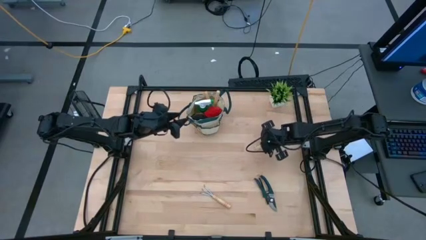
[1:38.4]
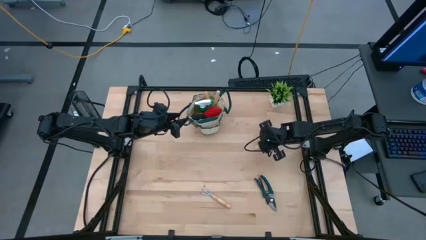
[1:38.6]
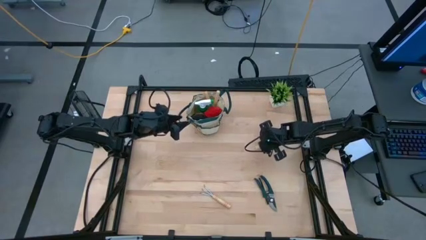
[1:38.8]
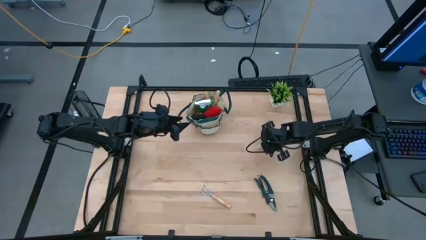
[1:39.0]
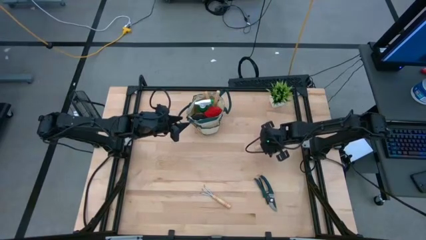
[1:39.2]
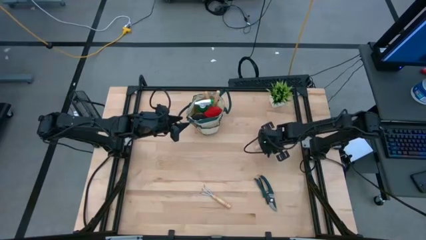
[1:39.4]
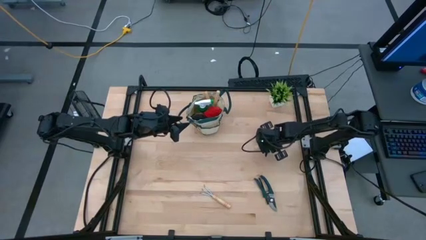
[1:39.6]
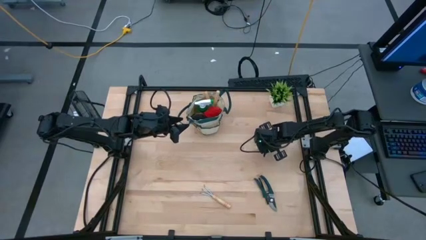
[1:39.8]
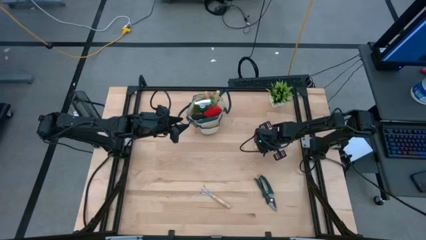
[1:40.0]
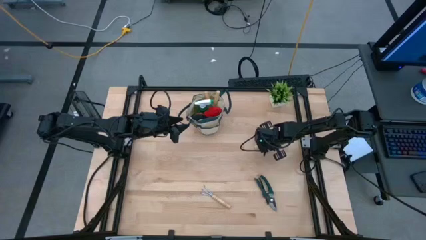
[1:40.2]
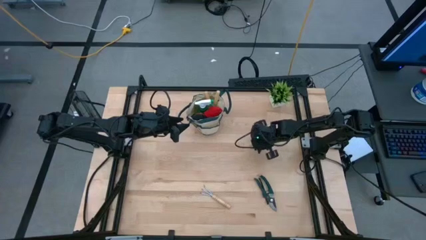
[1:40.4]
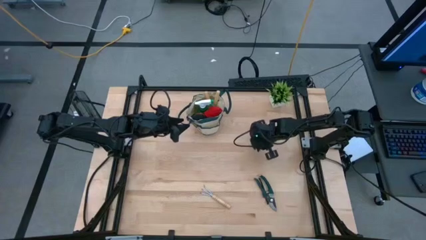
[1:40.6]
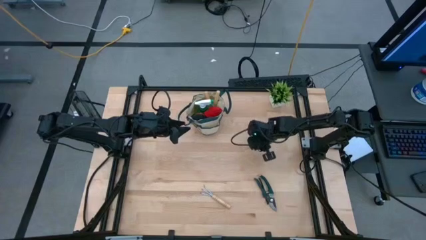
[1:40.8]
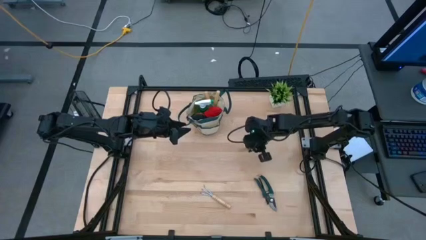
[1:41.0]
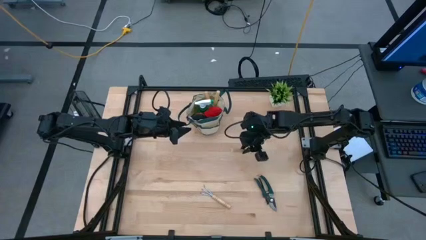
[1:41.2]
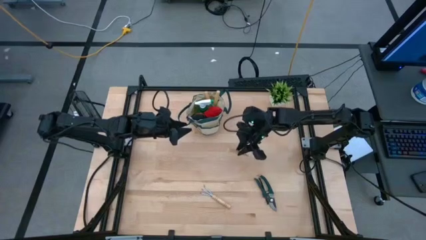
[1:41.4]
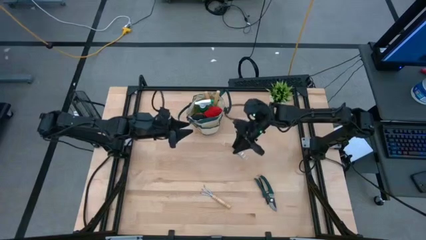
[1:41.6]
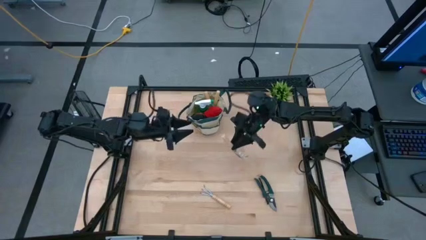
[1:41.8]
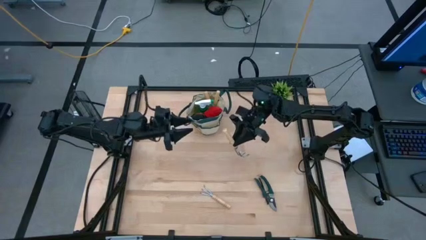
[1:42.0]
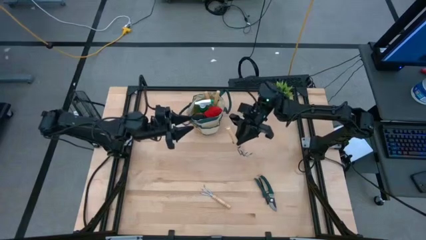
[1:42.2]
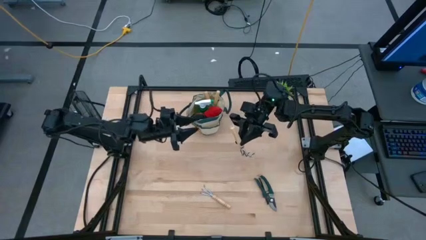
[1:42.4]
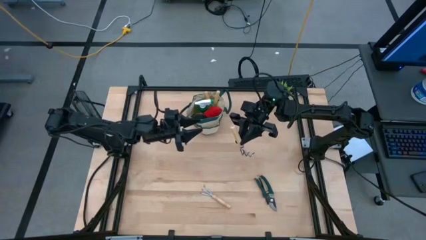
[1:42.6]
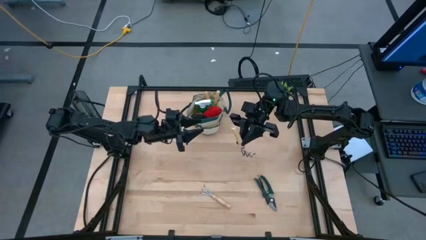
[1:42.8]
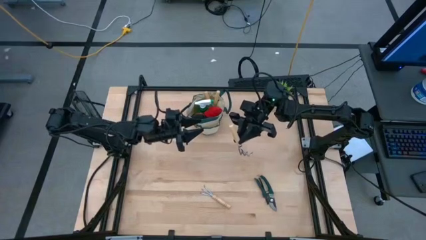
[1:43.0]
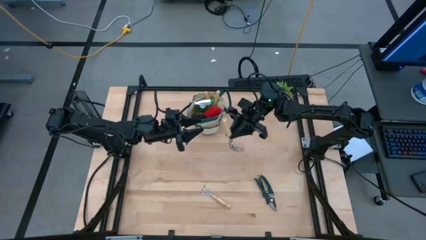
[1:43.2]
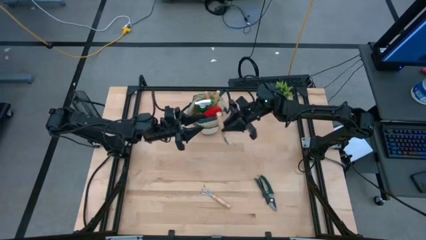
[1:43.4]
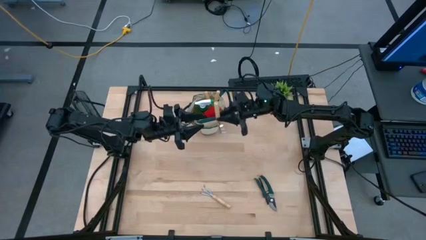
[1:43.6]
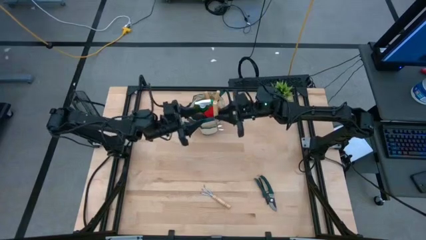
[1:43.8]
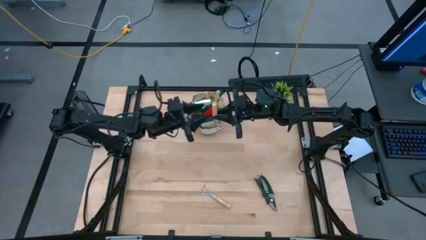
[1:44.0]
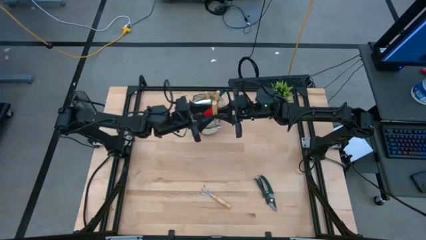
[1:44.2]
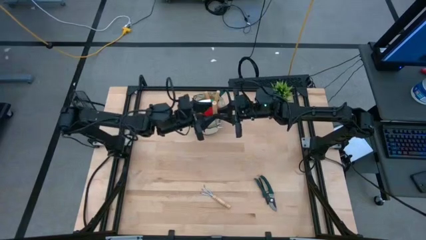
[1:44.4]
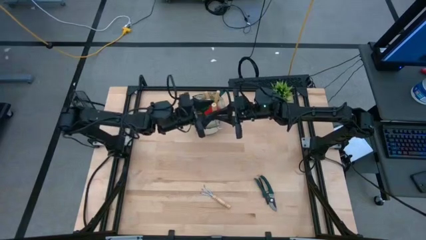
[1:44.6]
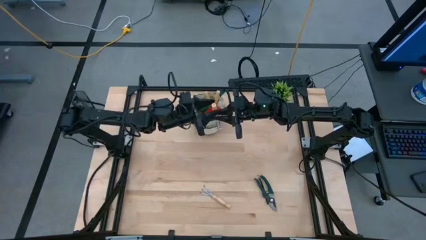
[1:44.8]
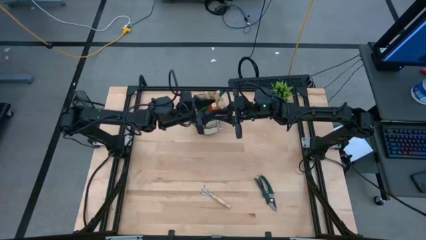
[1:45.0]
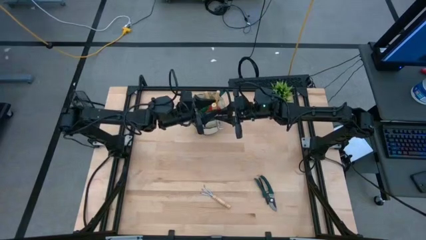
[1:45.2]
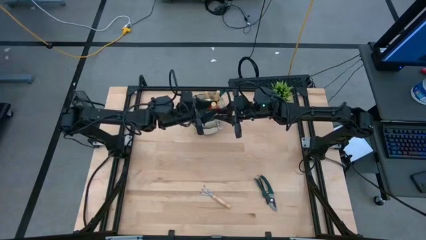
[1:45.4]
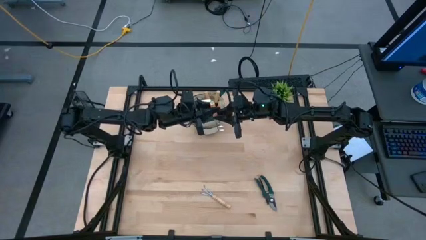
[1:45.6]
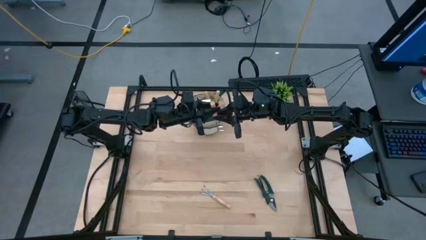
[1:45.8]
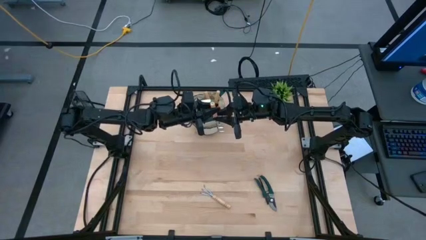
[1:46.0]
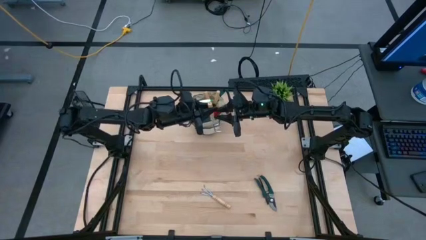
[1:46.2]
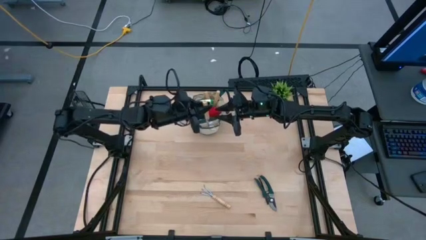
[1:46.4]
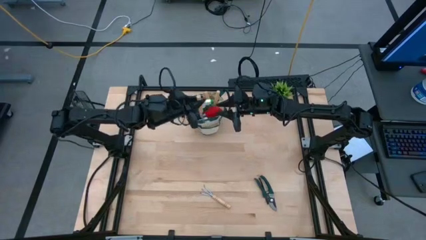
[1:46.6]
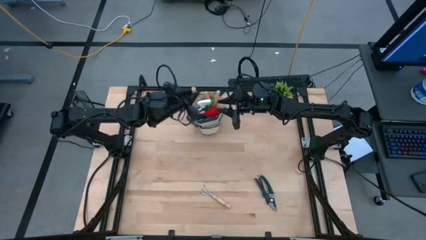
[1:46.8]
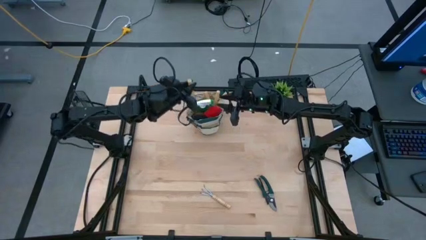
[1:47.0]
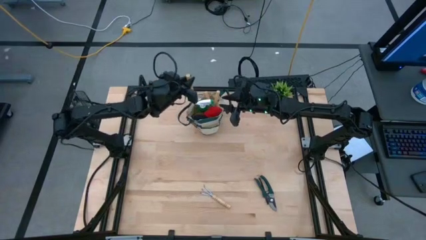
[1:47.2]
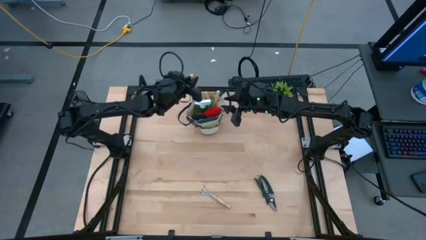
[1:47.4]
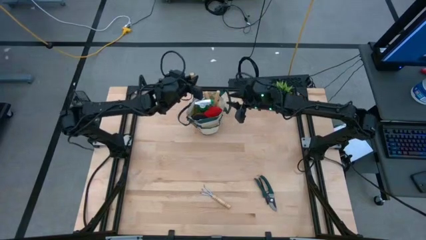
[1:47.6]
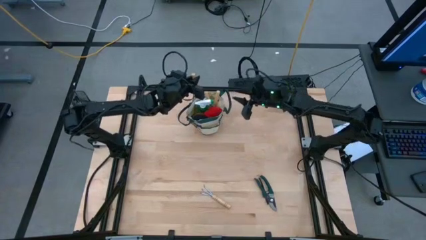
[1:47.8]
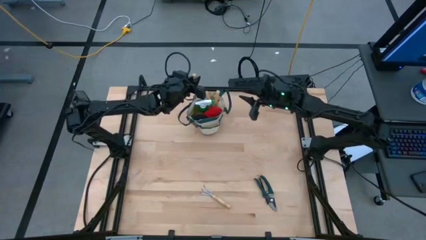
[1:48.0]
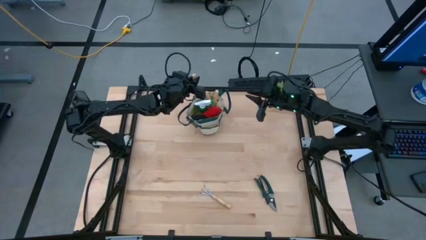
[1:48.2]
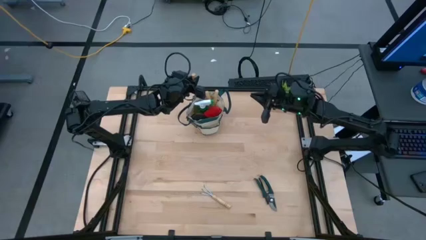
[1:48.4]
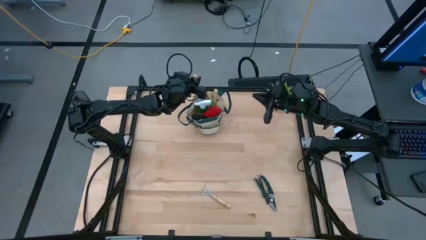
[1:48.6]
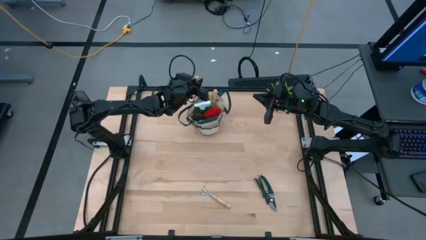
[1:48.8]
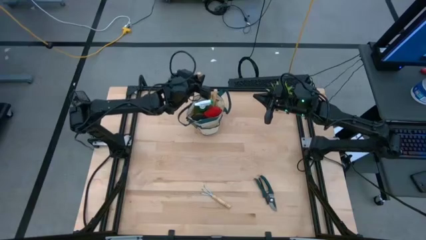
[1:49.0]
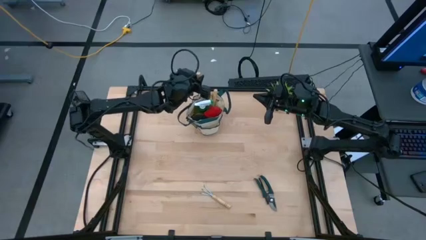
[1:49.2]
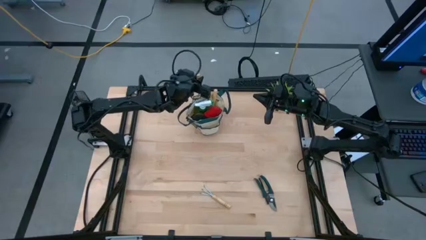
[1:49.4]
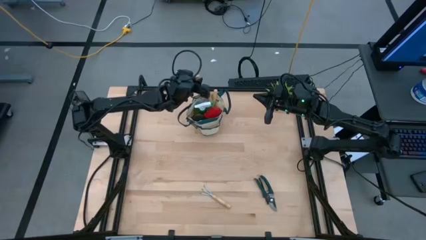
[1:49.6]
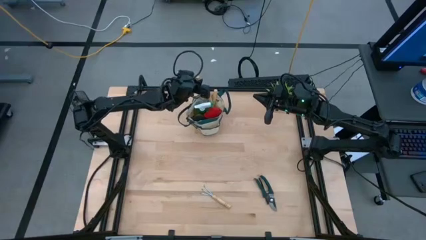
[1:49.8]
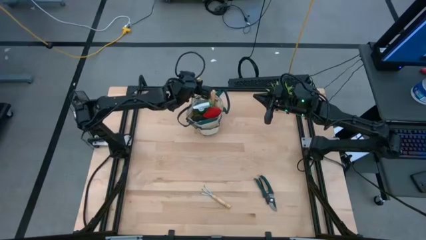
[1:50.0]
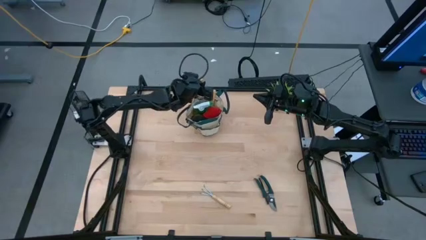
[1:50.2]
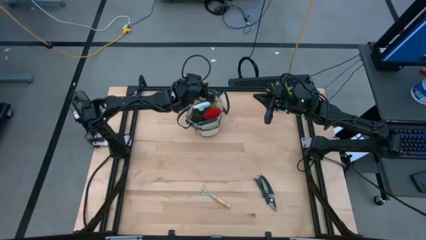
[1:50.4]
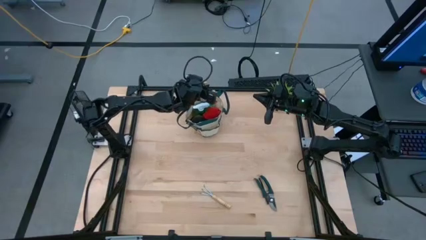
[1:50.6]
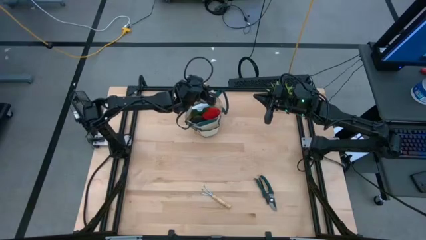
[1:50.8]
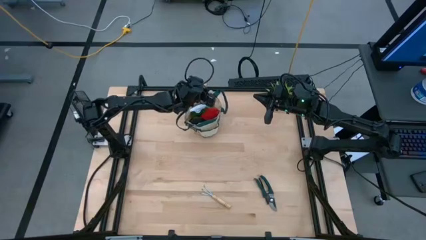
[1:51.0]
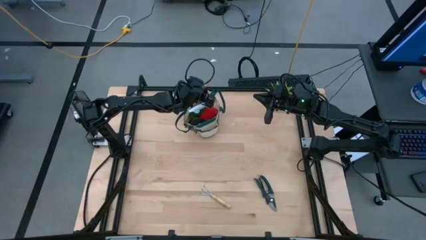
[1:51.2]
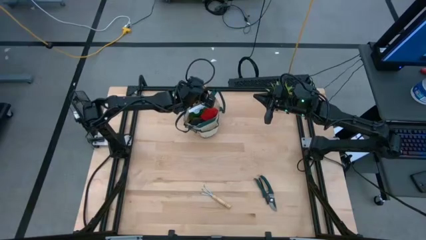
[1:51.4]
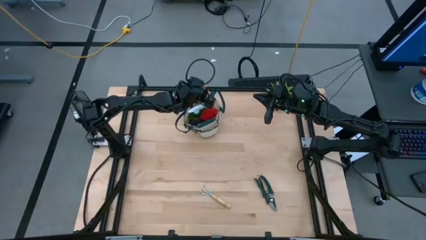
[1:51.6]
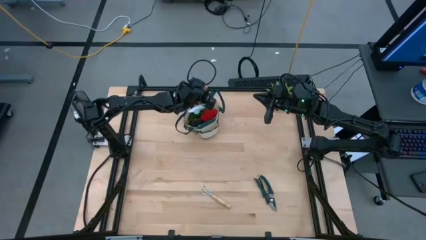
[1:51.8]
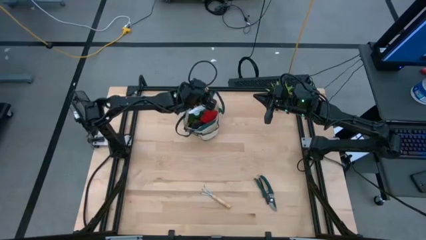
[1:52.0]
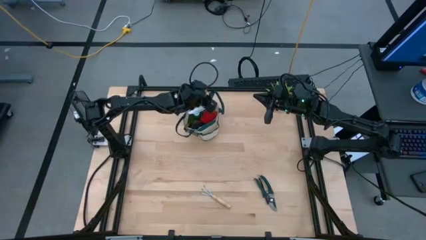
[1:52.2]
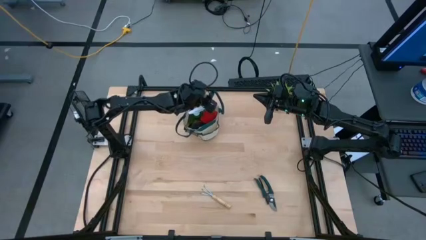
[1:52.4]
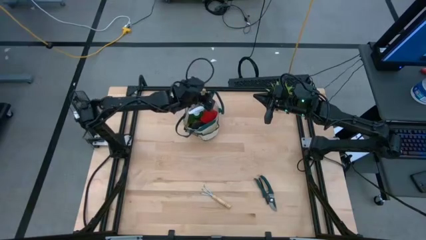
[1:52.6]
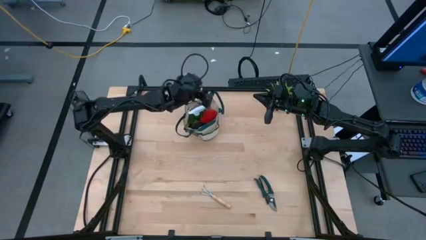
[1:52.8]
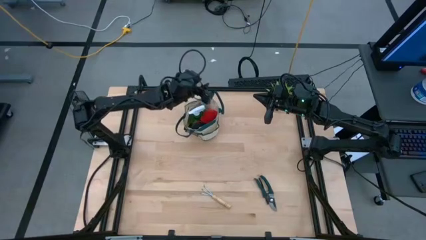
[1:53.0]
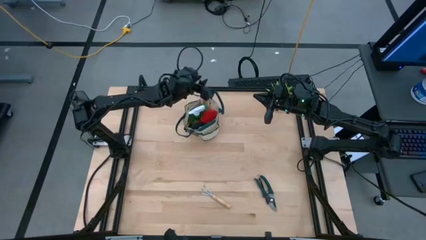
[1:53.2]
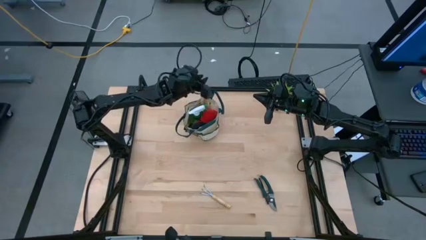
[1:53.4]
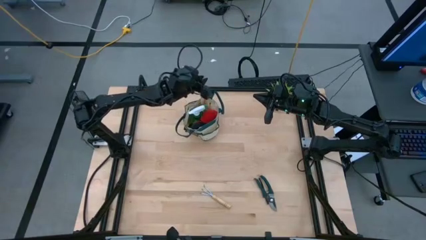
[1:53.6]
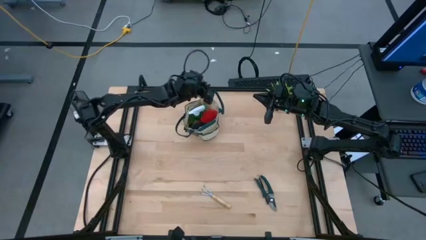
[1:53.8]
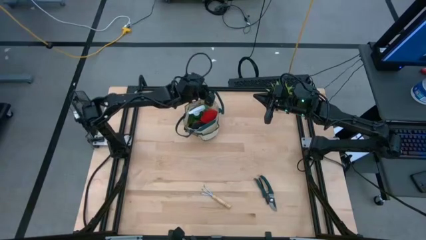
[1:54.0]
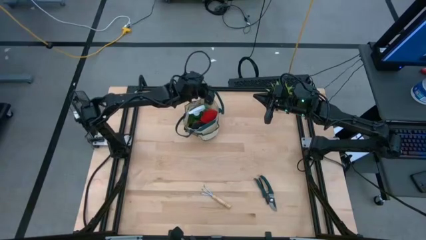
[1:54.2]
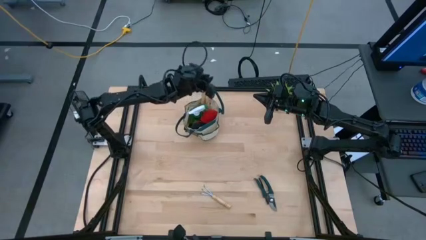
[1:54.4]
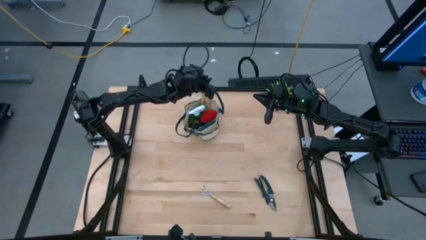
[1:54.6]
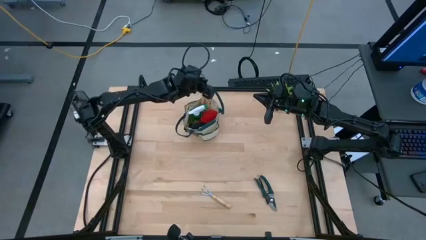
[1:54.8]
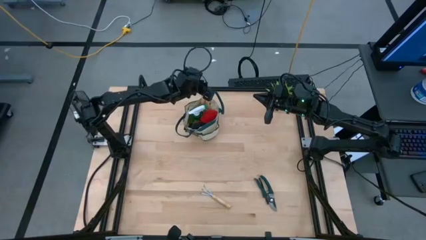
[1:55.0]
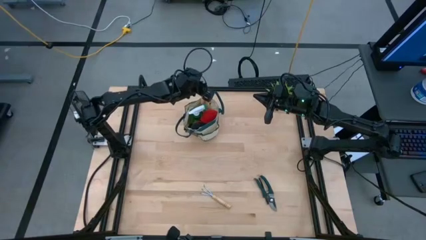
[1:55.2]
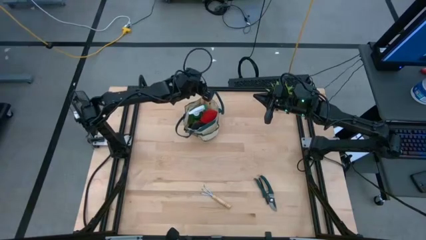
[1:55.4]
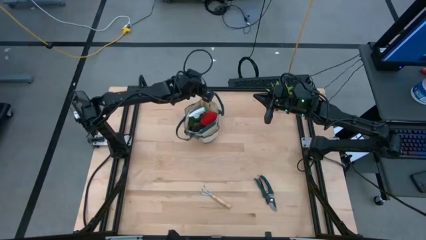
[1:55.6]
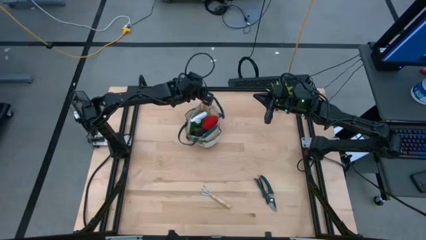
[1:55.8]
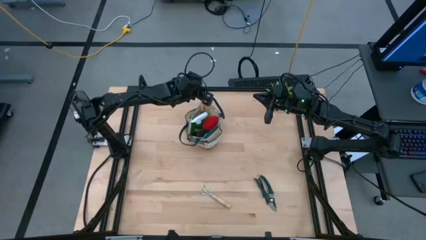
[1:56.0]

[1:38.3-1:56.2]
Task: Pick & Place Garden tools in Gardening bag
Put the top hand rake into the gardening bag
